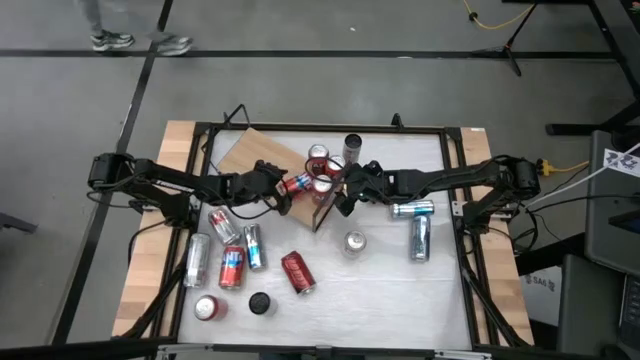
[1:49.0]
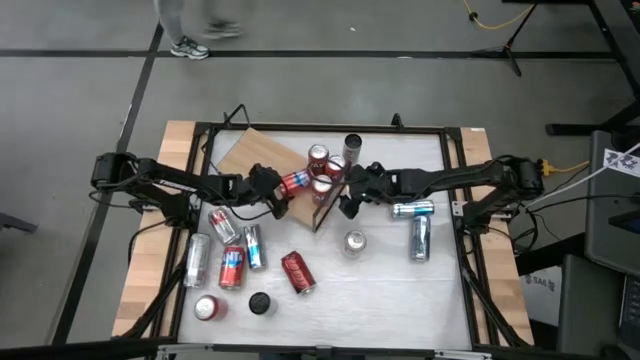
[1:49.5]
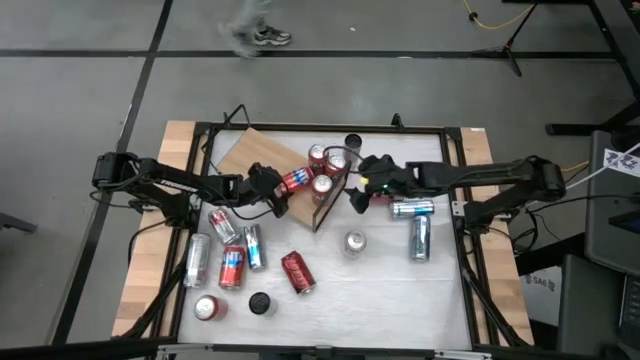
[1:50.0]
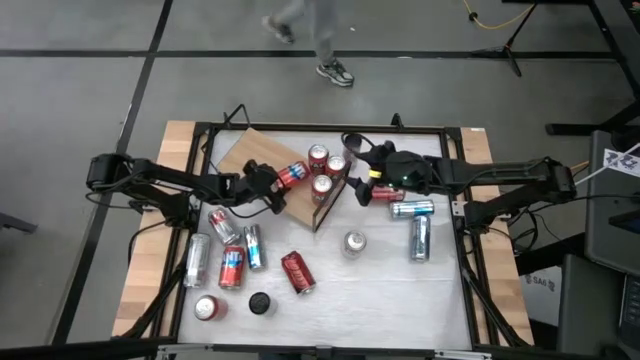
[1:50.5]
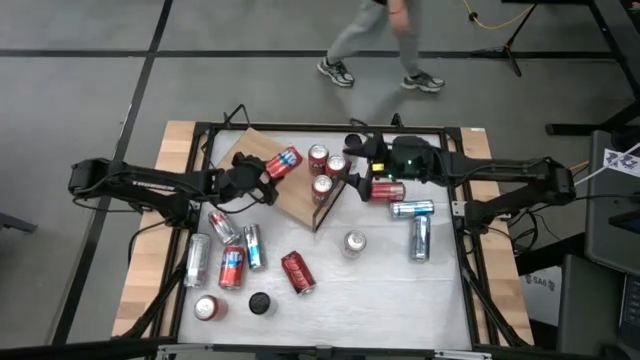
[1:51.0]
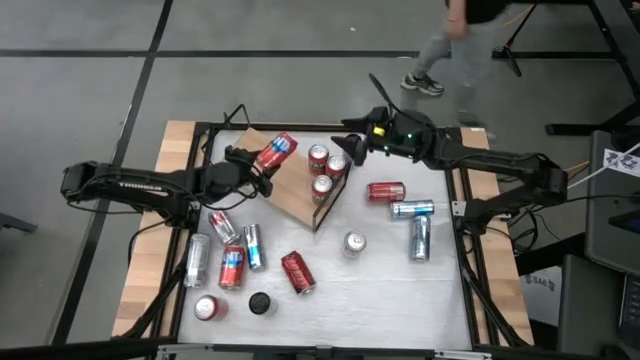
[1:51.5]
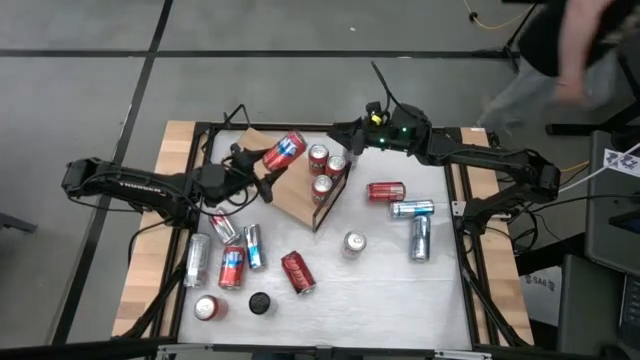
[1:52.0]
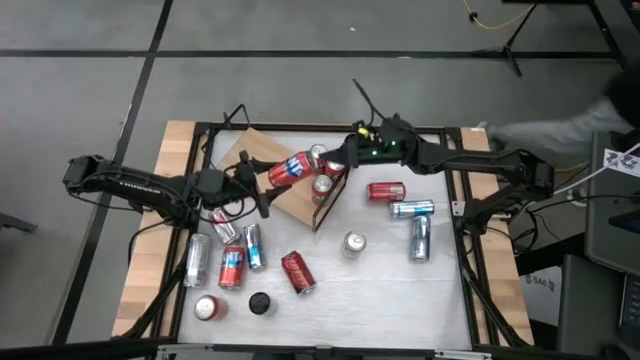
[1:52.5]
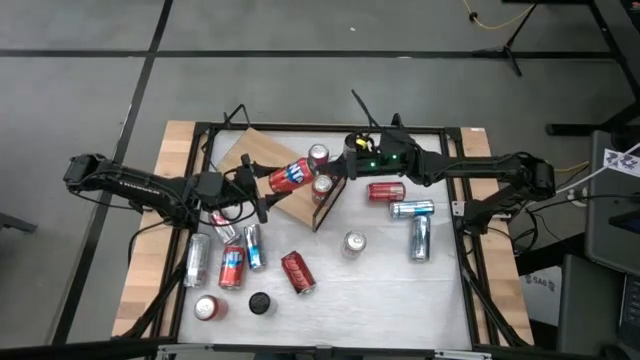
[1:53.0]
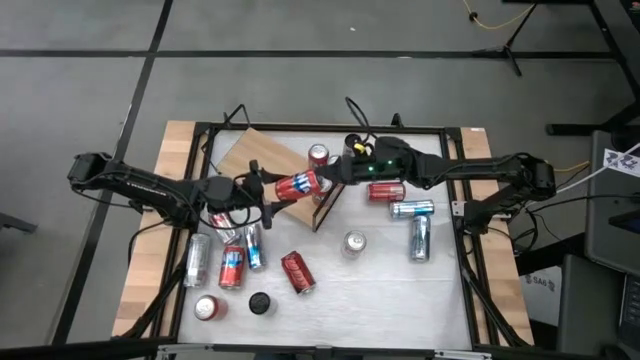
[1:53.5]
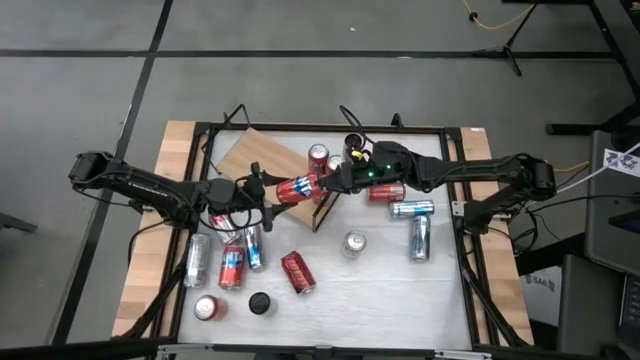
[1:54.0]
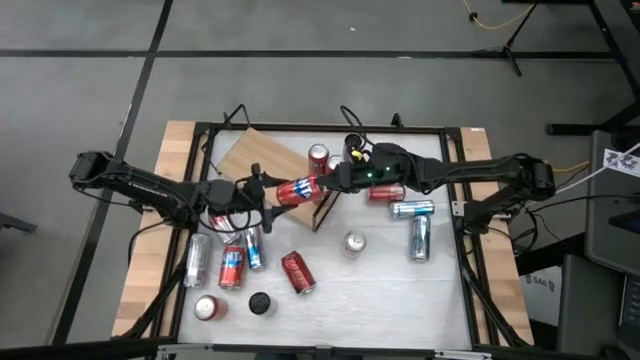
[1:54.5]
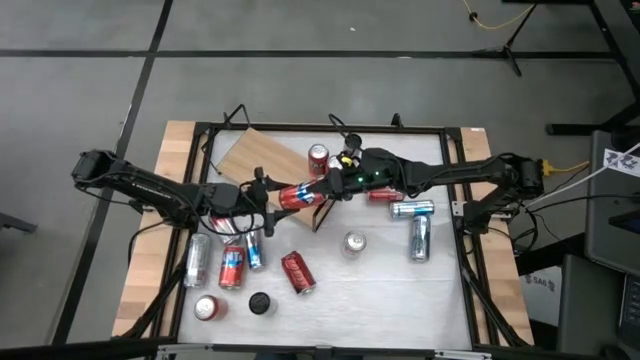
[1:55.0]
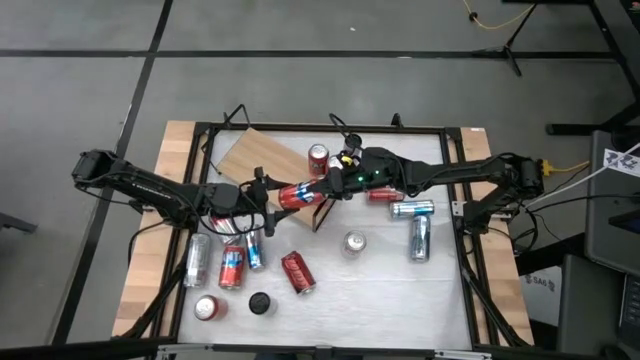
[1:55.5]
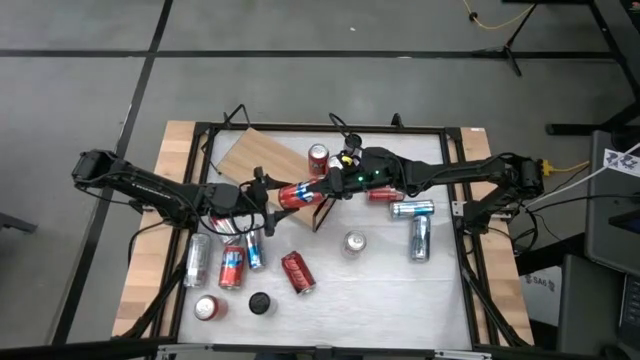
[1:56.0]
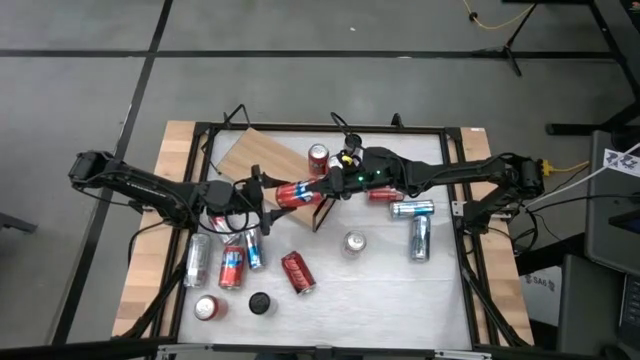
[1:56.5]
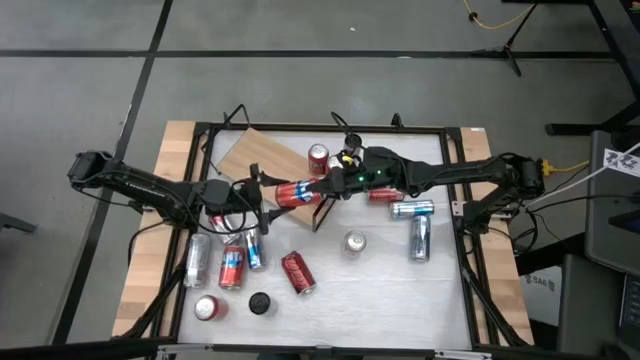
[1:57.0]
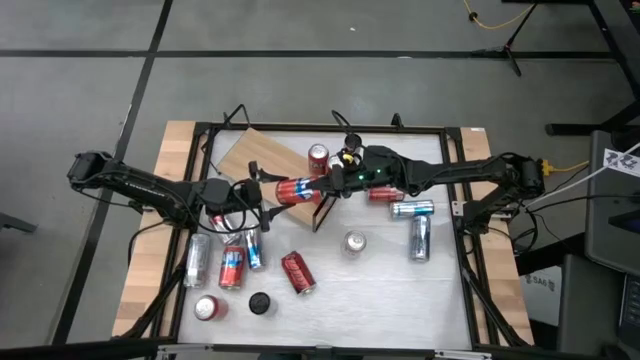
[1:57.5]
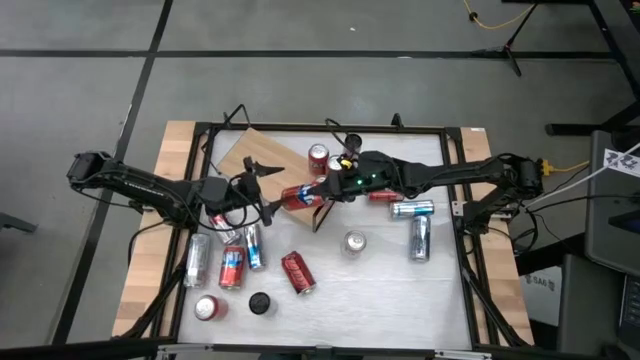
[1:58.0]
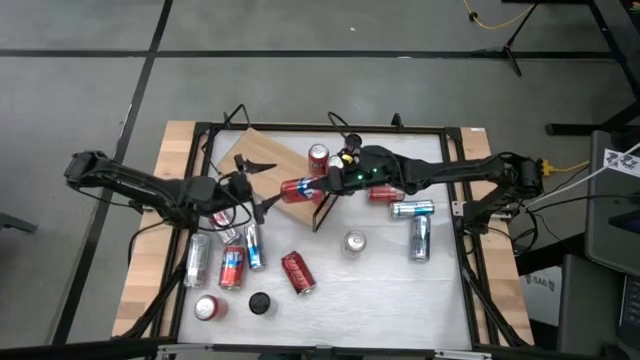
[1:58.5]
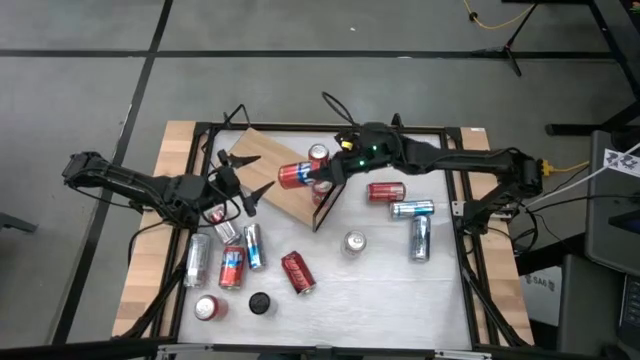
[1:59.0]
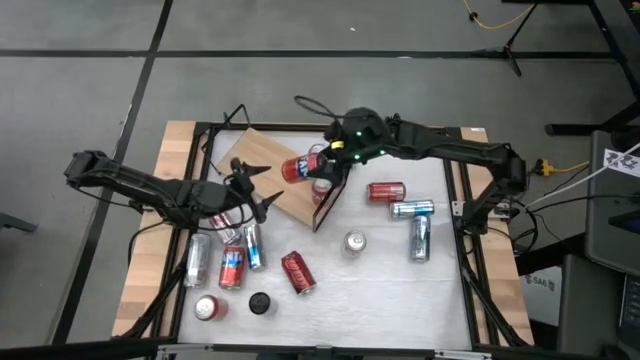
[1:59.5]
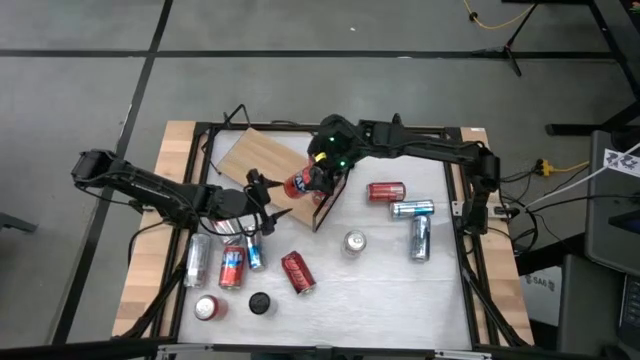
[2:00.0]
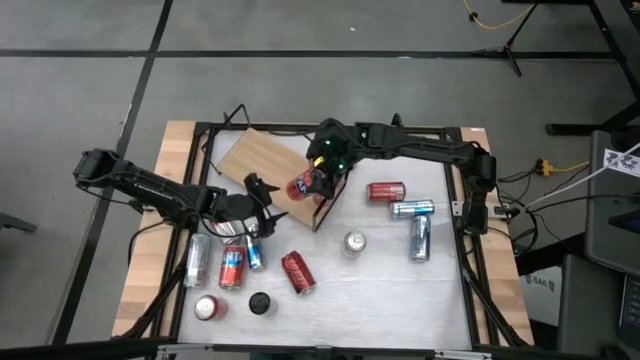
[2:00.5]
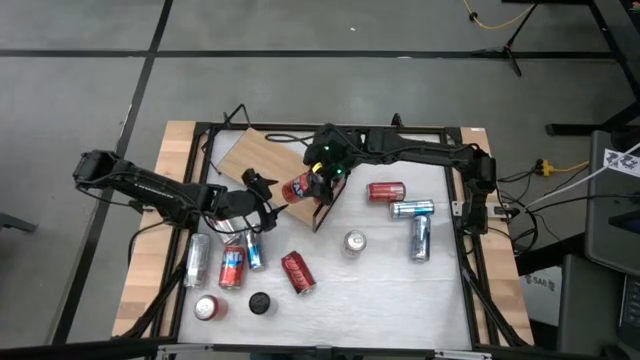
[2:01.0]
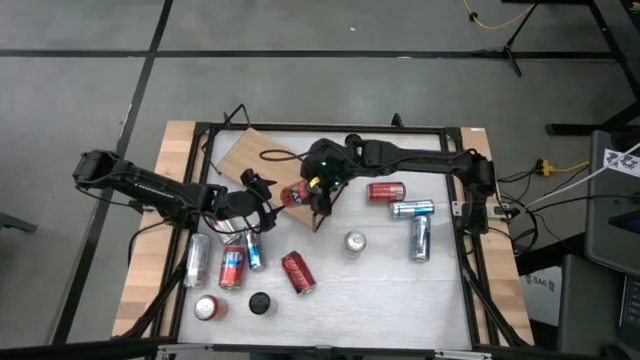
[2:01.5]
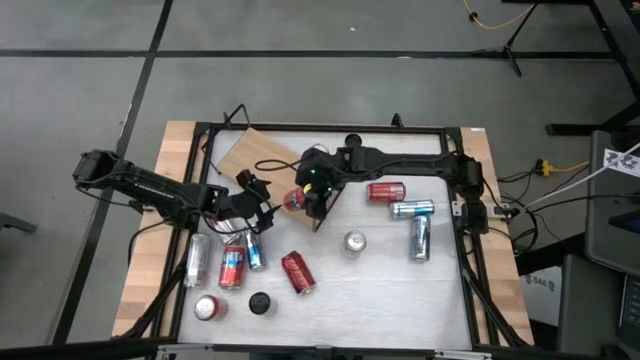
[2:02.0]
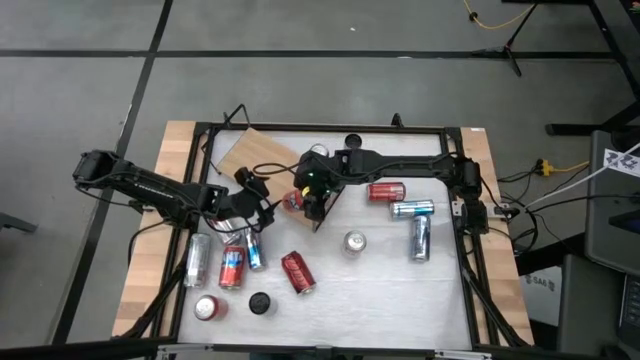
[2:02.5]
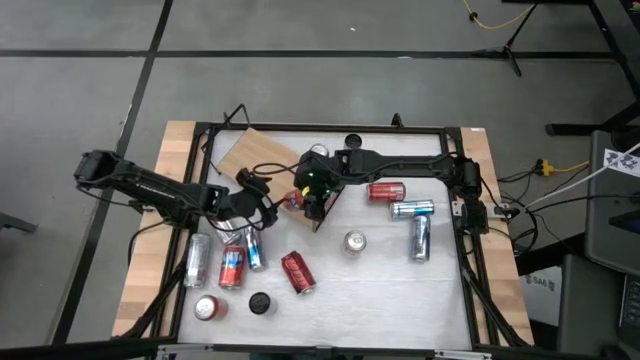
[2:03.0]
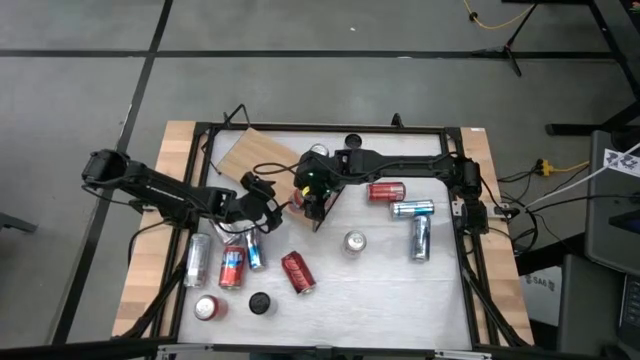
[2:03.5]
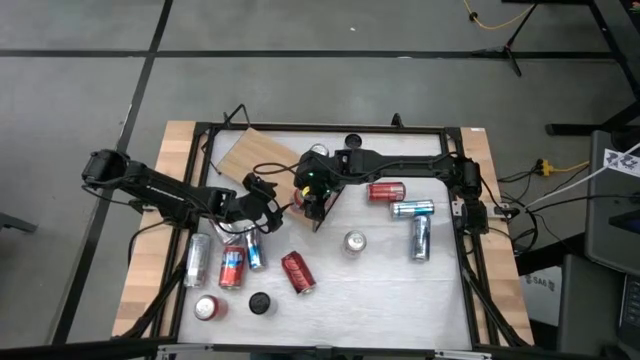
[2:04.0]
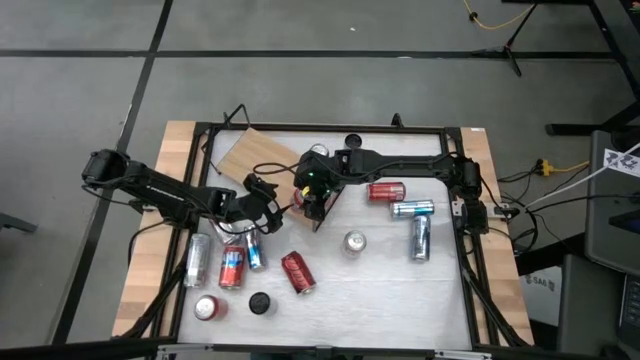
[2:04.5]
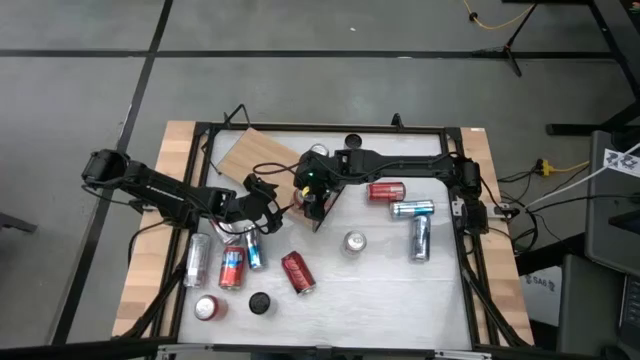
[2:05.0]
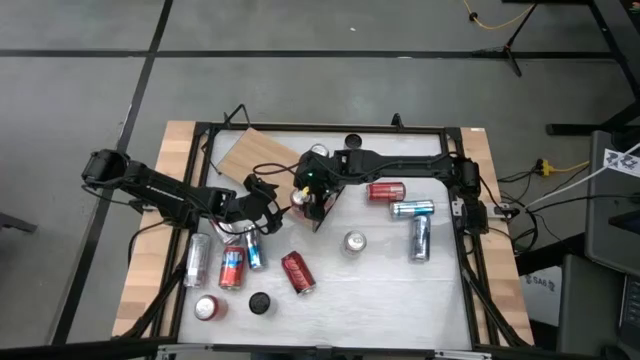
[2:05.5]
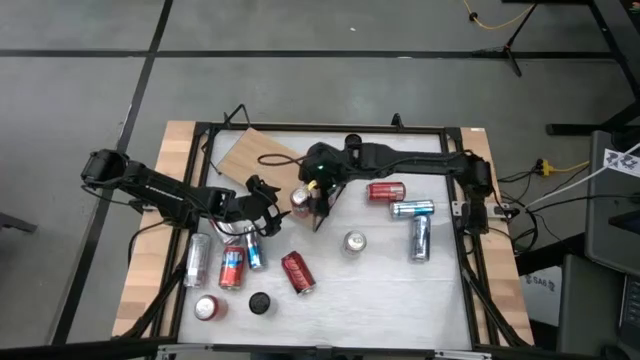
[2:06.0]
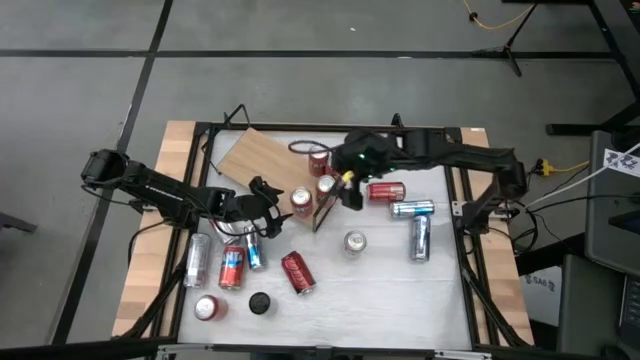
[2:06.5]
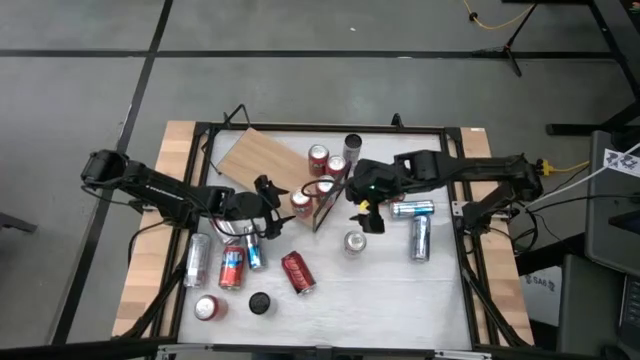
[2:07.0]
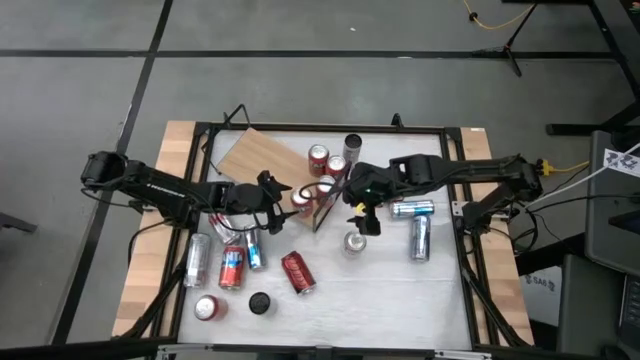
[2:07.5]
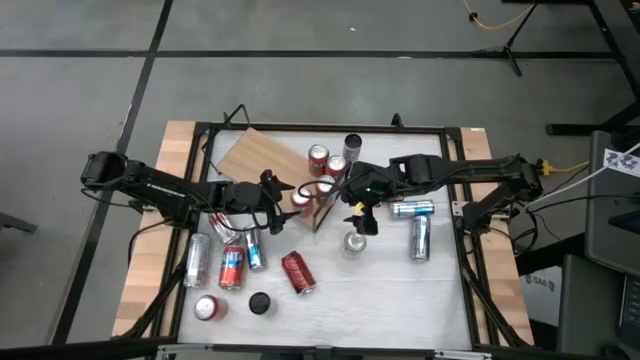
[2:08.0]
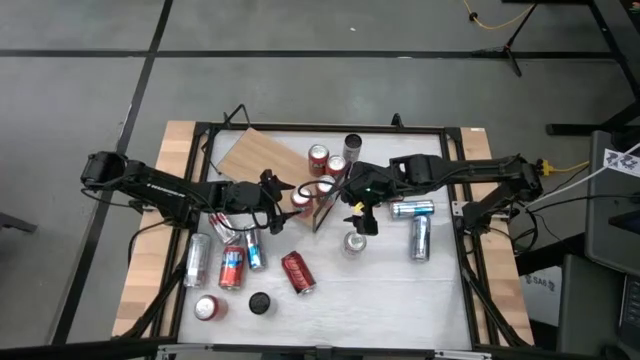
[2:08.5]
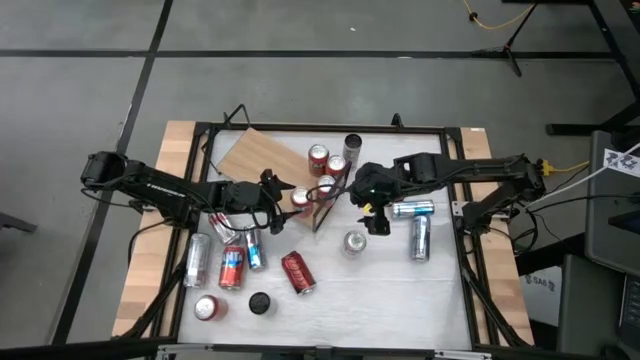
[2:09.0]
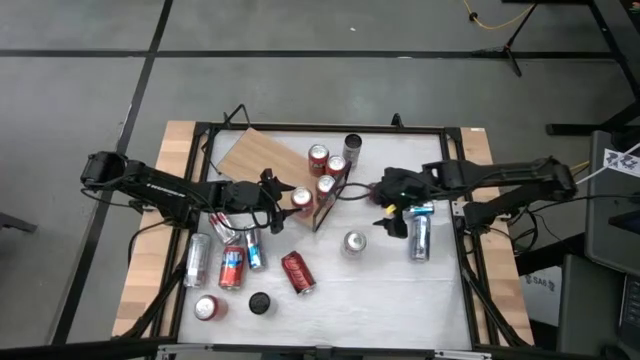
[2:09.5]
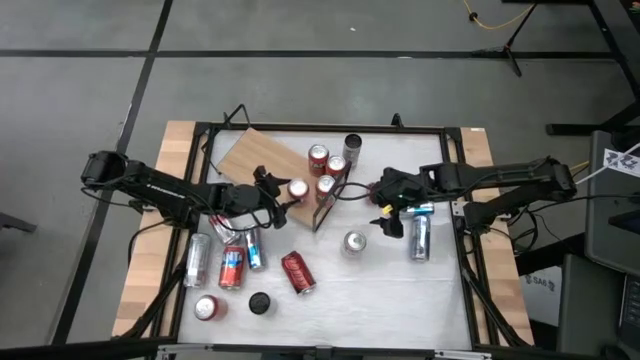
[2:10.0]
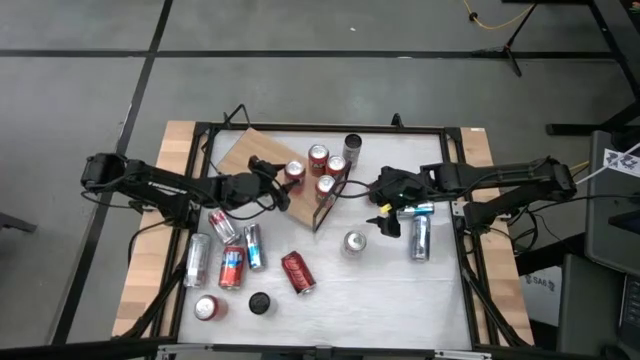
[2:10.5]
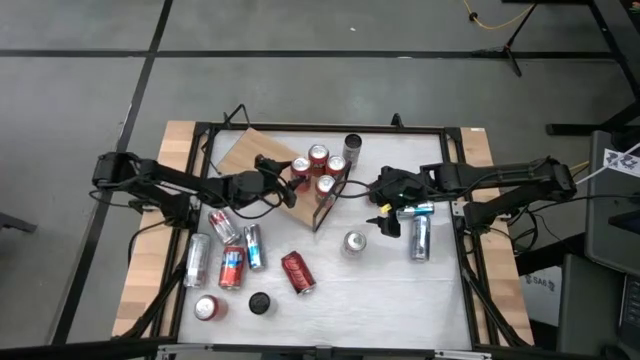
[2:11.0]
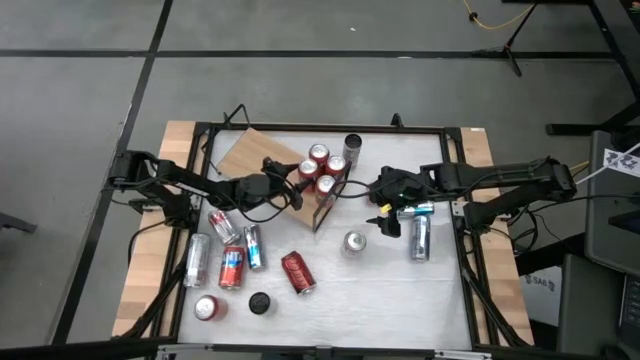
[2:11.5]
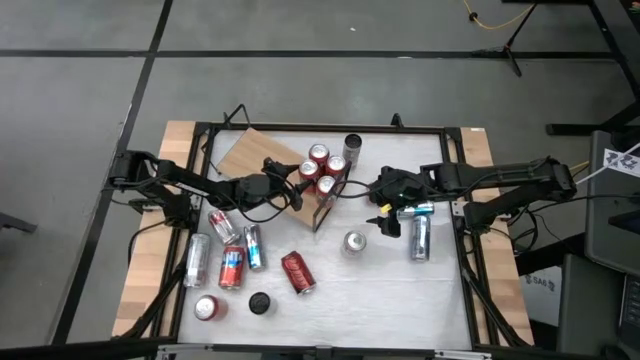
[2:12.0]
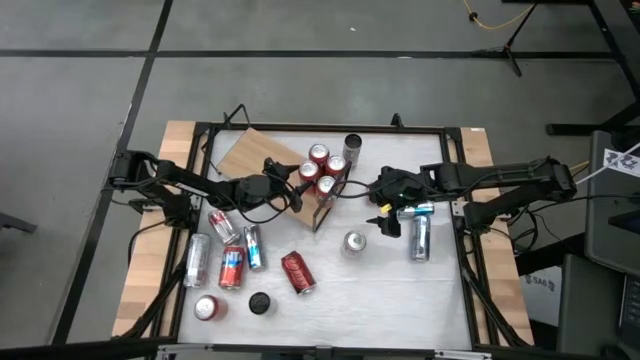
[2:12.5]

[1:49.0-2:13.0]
Task: Pick and place cans onto a shelf
Put the bottom right red soda can on the shelf aligned with the other red soda can
